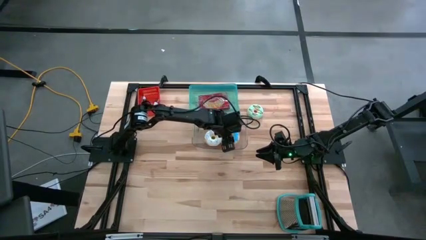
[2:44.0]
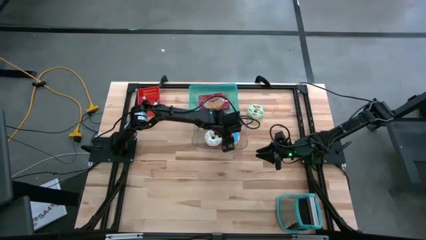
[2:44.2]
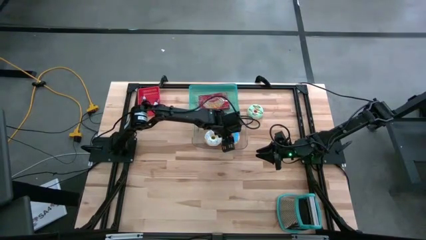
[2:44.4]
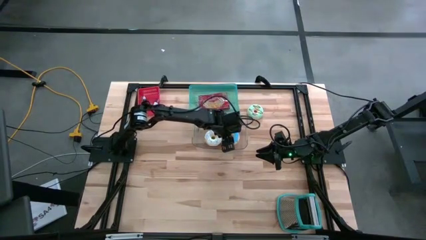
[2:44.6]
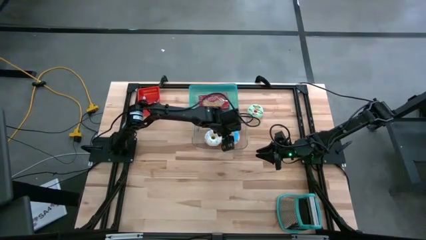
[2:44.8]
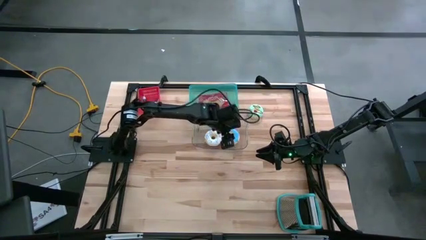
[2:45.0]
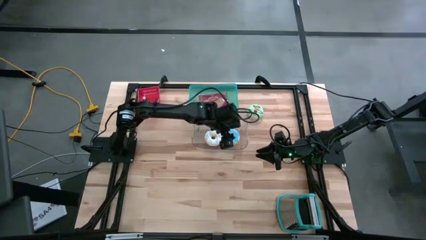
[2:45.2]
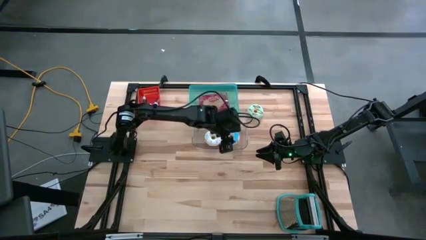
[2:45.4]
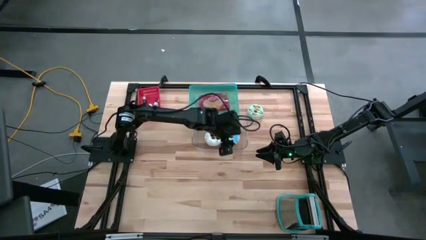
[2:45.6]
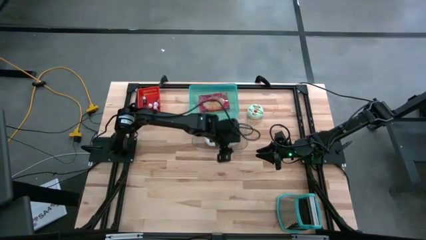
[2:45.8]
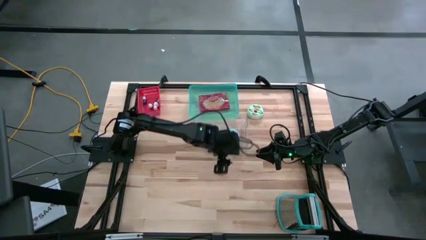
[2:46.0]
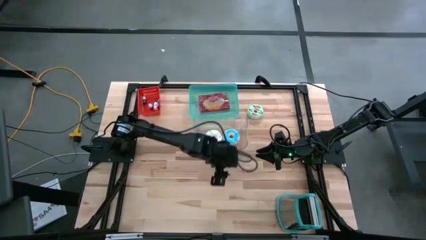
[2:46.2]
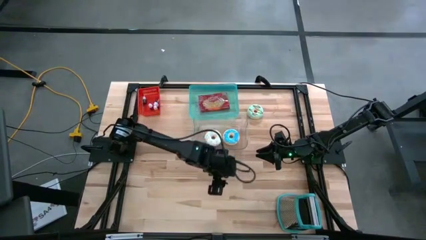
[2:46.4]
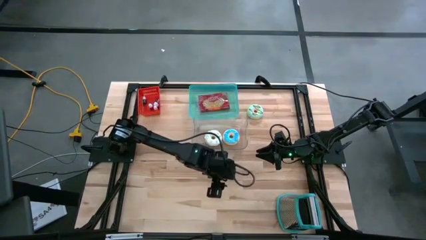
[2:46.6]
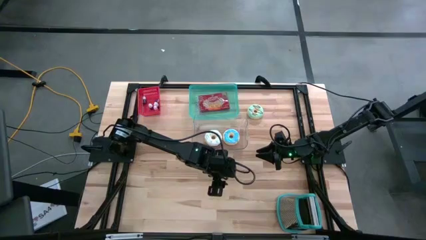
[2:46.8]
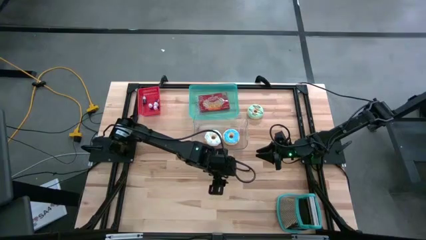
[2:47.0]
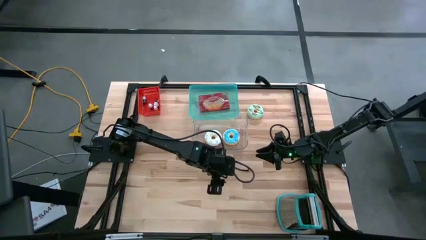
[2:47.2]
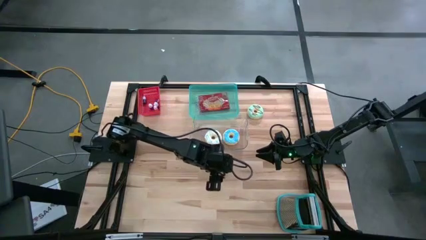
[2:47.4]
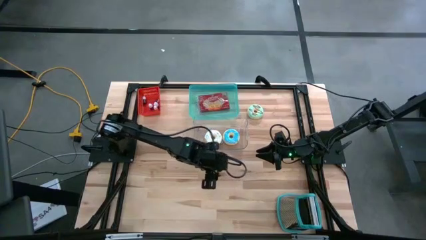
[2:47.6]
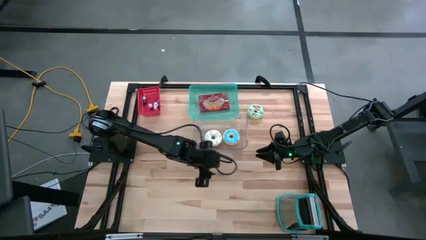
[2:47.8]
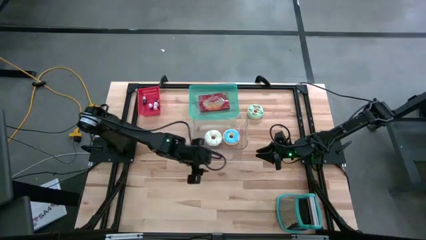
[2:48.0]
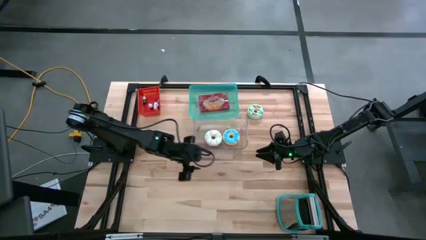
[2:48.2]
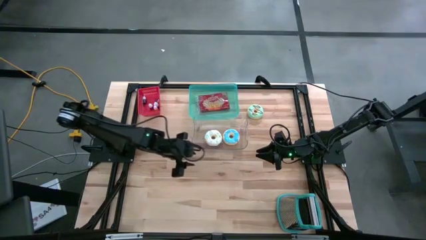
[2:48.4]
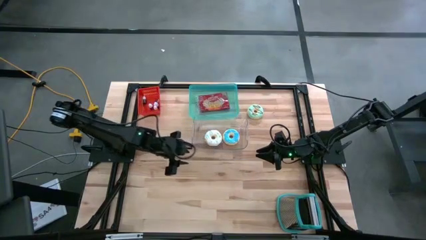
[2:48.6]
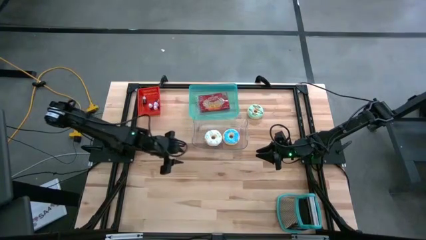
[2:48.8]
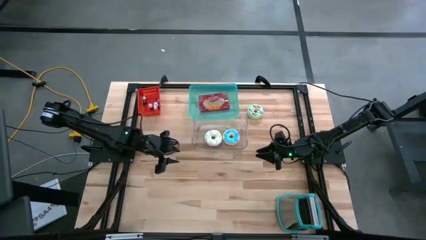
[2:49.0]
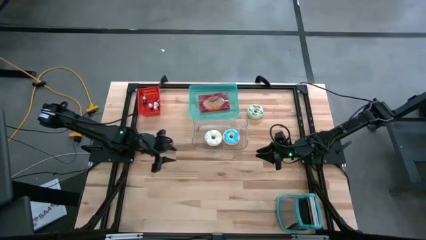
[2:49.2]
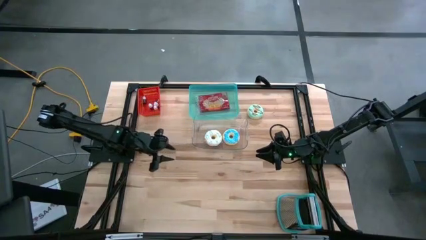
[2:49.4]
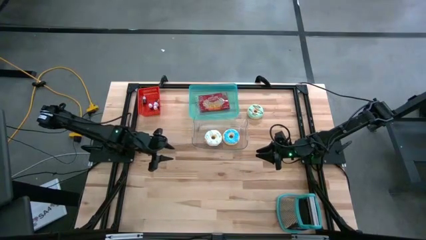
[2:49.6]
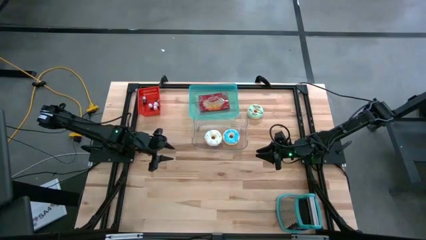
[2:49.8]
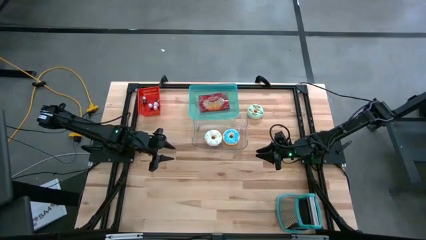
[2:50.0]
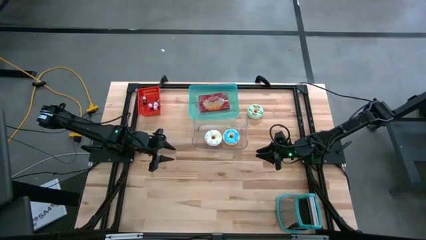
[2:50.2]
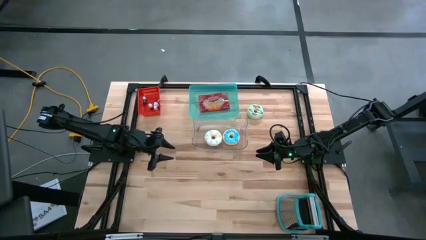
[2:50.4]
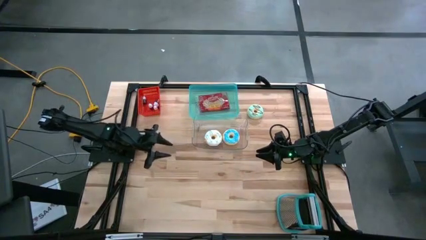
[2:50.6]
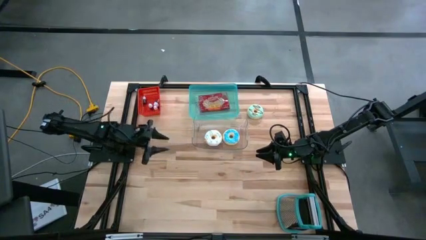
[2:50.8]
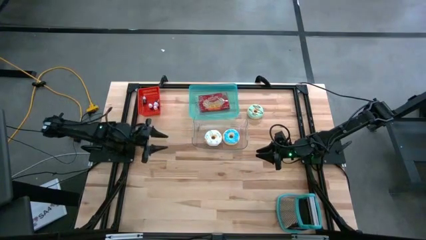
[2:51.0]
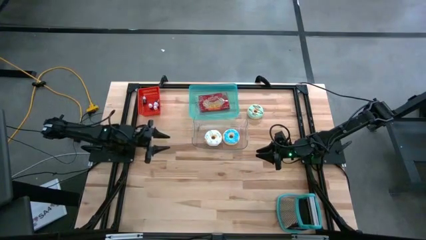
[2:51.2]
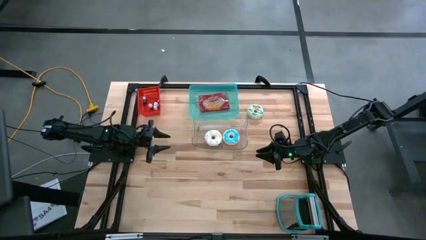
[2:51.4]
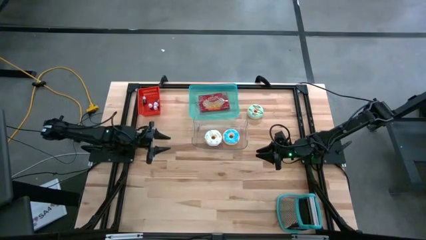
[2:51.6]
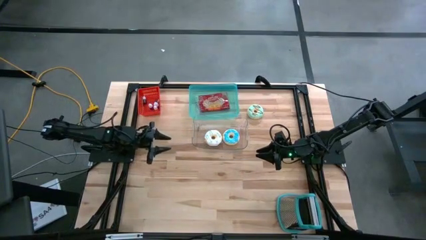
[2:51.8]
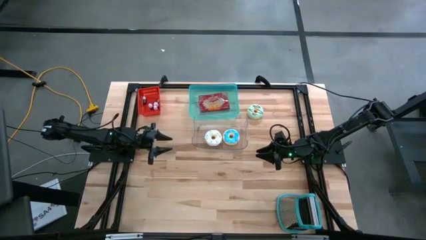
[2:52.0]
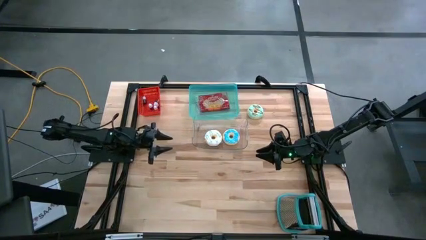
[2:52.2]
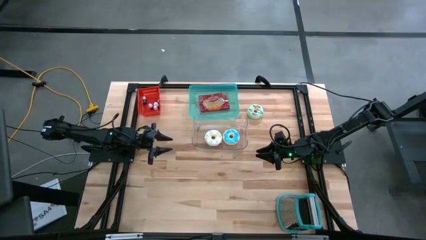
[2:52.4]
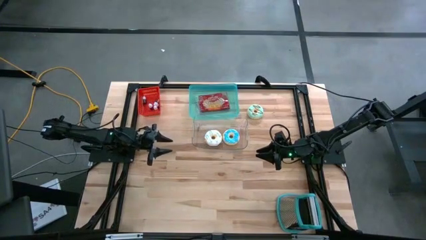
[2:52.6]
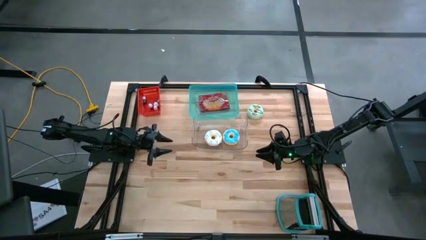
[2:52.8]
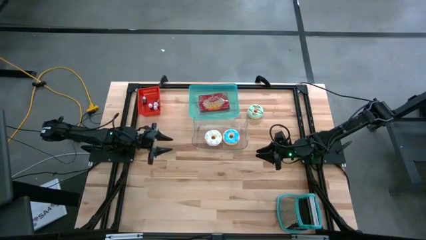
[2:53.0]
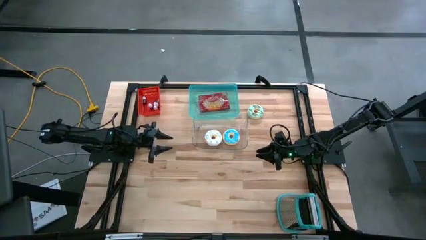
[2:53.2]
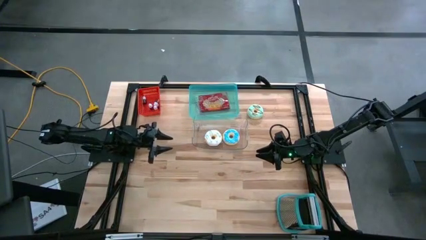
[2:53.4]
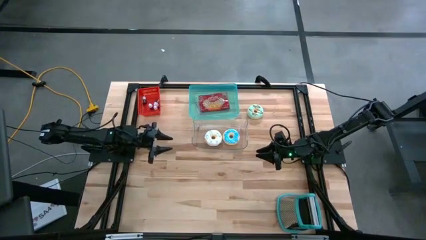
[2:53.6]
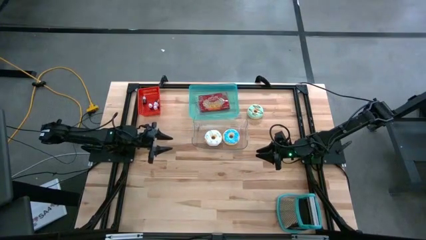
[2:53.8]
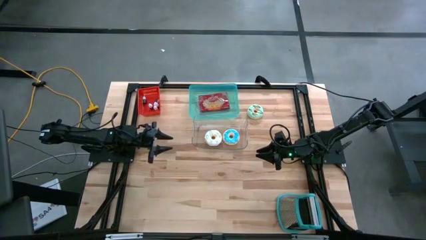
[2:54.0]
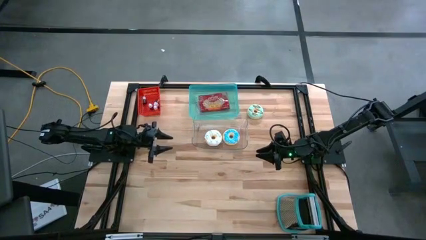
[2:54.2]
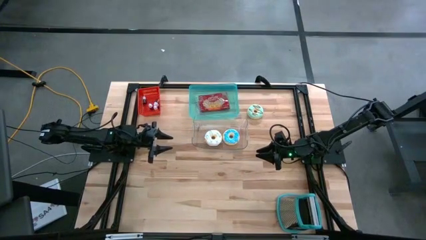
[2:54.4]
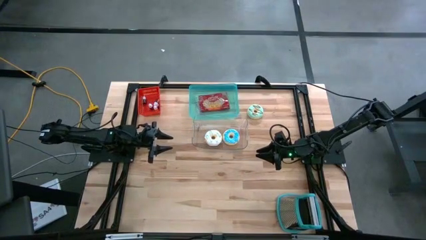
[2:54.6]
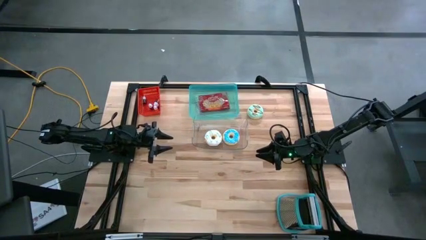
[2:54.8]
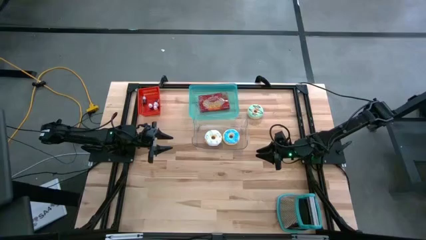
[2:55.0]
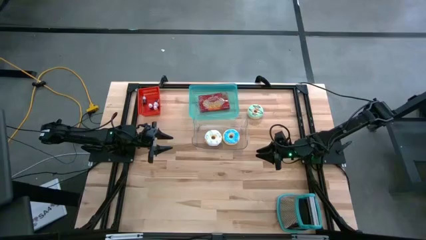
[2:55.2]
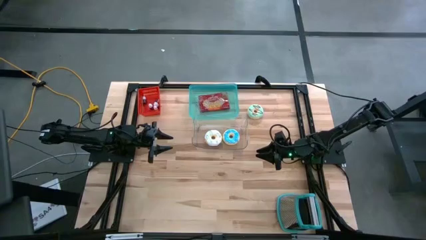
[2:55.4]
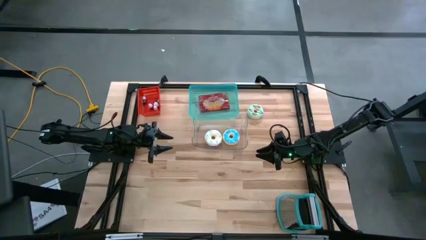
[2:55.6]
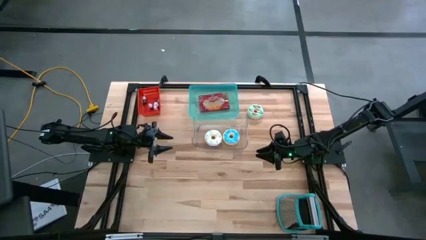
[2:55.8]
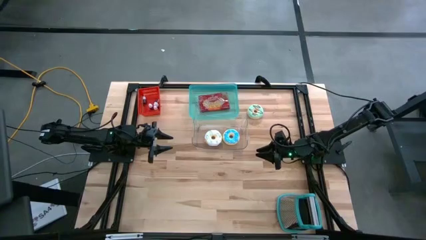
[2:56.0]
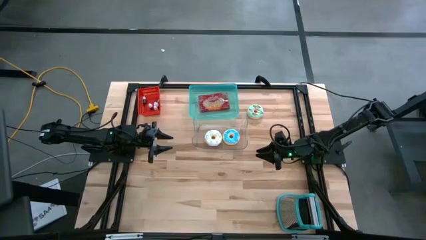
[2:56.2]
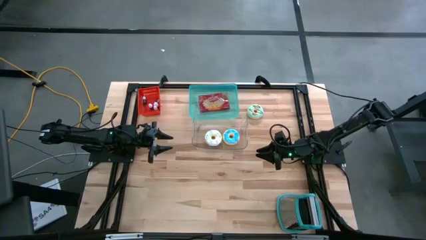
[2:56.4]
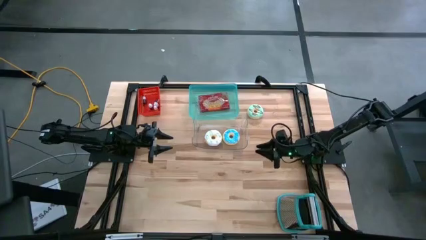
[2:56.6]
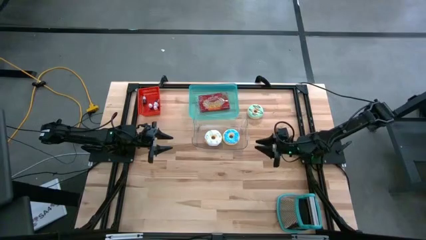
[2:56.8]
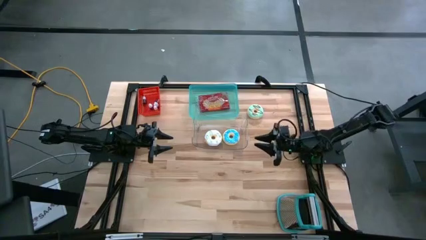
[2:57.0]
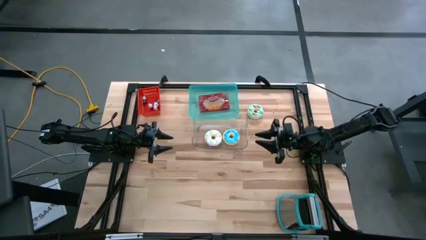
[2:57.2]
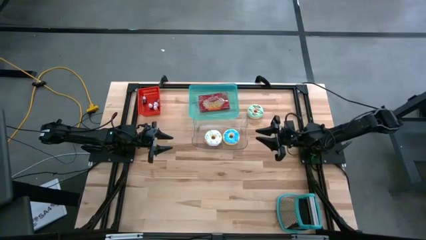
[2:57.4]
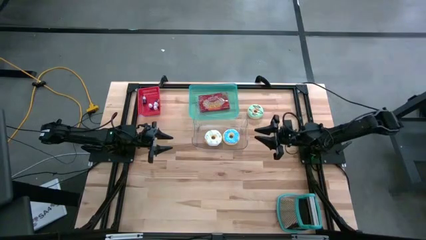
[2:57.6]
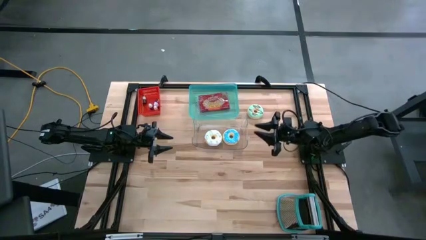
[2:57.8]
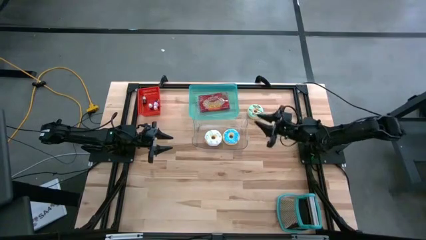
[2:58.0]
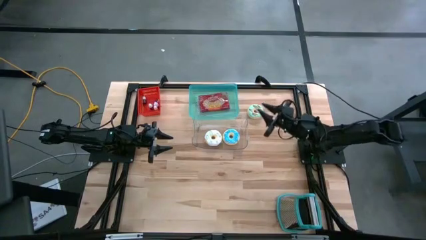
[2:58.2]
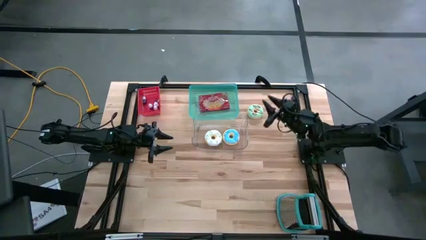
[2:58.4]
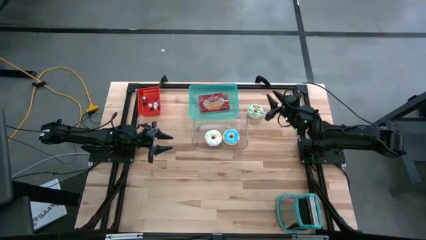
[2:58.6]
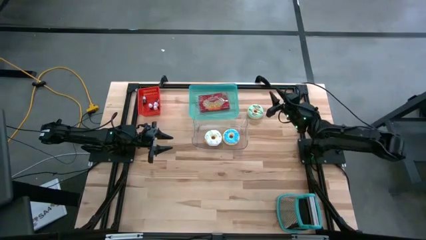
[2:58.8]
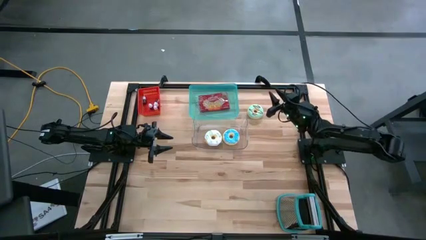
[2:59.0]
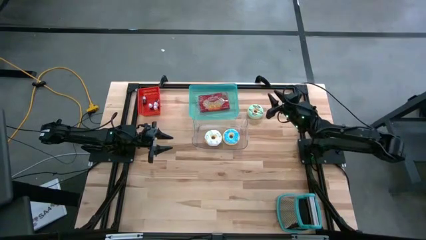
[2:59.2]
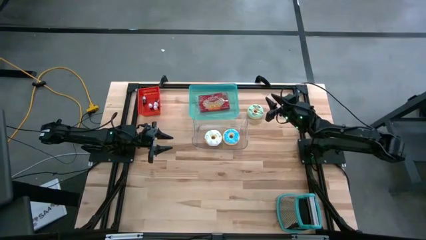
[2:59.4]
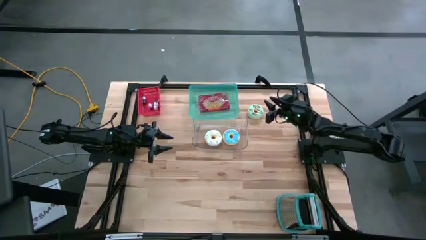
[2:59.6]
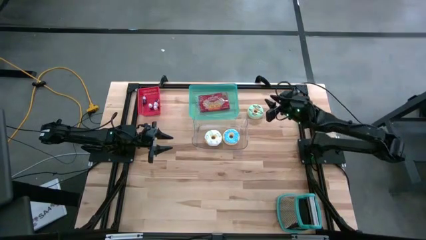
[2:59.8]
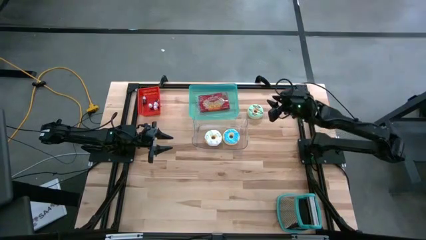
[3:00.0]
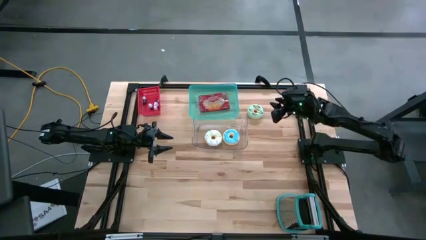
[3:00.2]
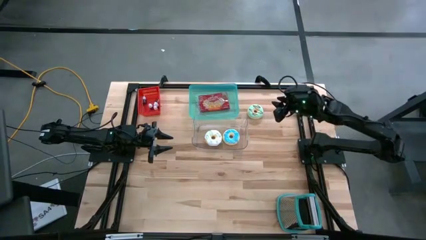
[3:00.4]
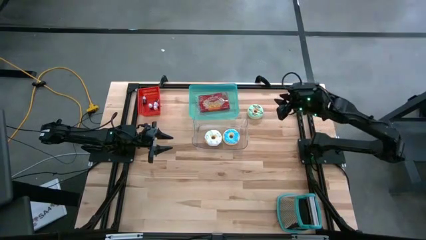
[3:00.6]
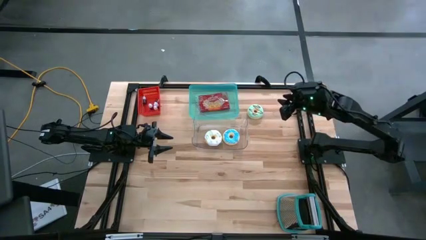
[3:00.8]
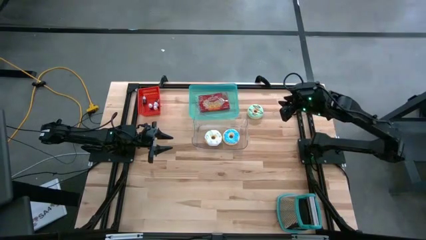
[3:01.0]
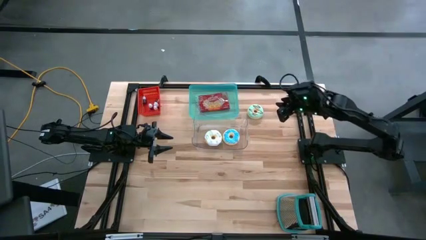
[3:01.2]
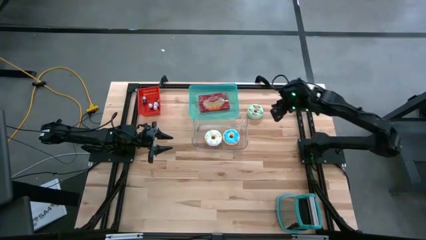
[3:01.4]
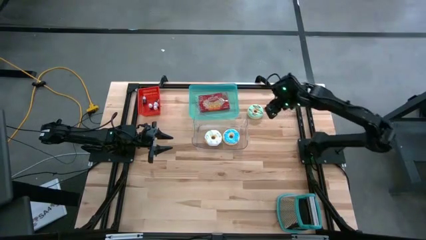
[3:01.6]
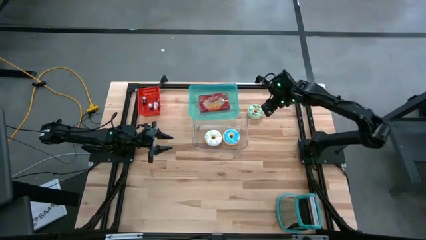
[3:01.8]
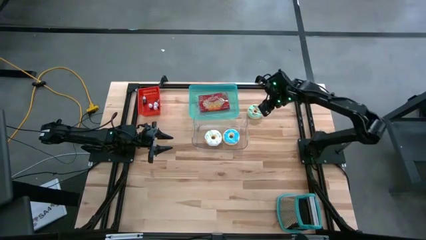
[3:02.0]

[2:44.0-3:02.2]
Put the green donut into the transparent bin
